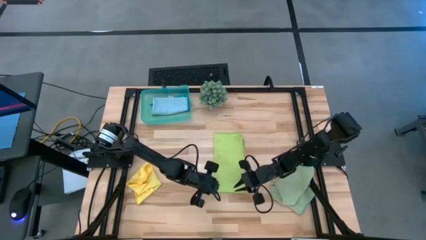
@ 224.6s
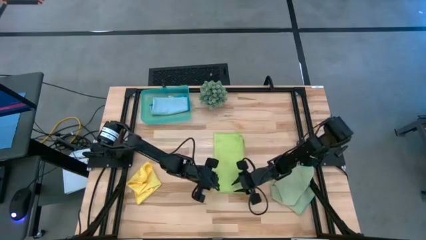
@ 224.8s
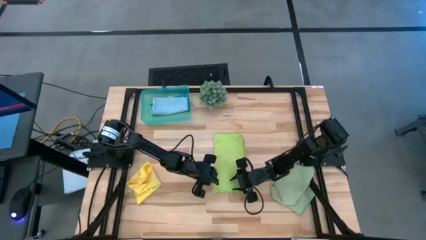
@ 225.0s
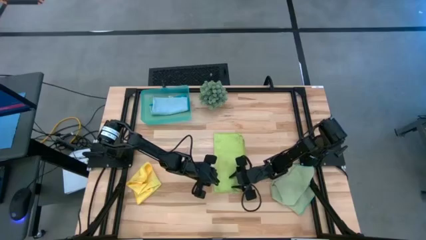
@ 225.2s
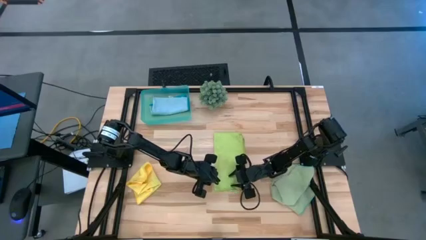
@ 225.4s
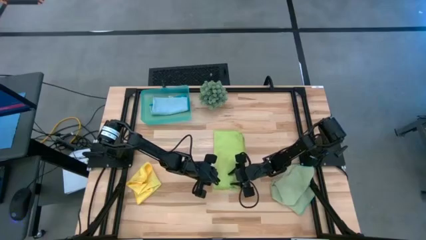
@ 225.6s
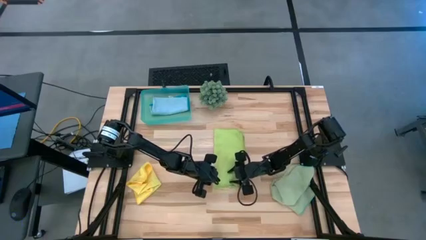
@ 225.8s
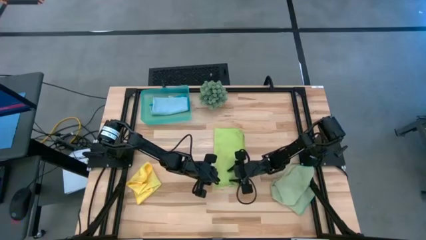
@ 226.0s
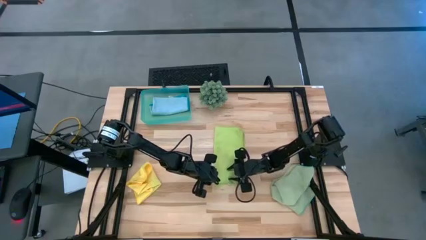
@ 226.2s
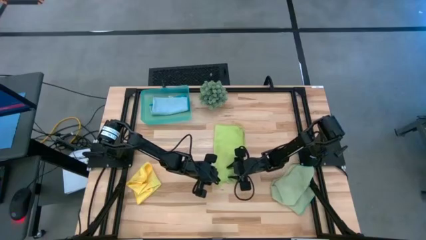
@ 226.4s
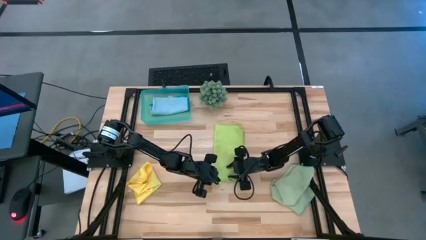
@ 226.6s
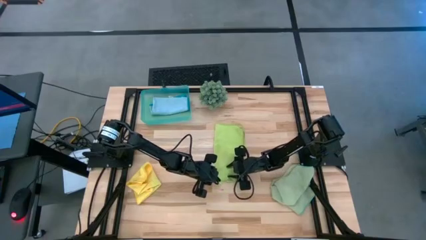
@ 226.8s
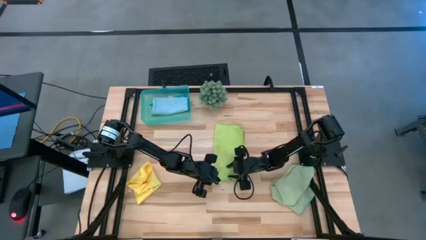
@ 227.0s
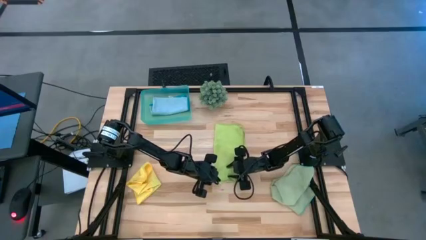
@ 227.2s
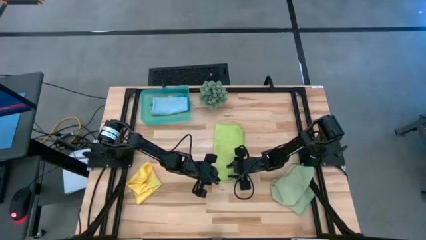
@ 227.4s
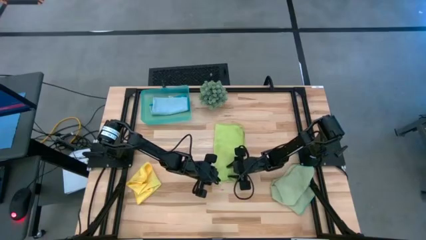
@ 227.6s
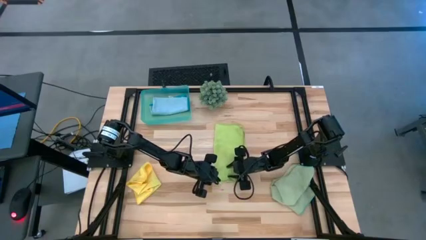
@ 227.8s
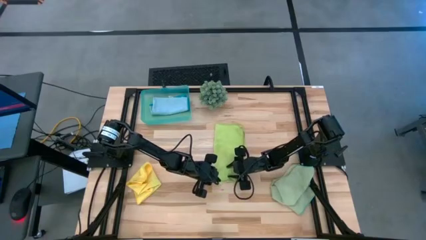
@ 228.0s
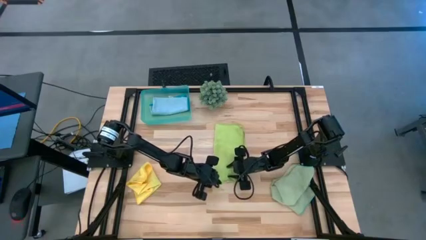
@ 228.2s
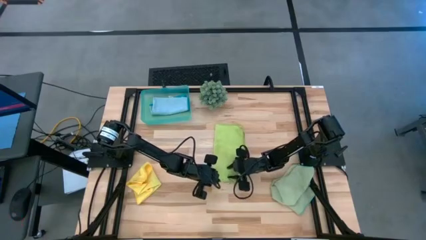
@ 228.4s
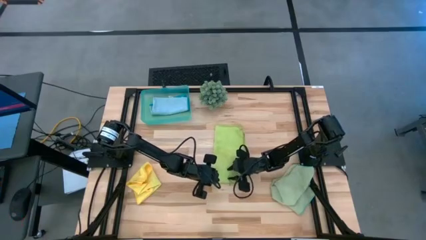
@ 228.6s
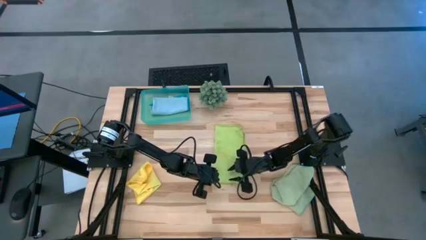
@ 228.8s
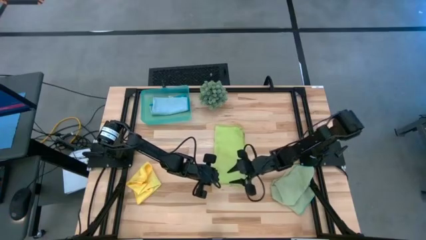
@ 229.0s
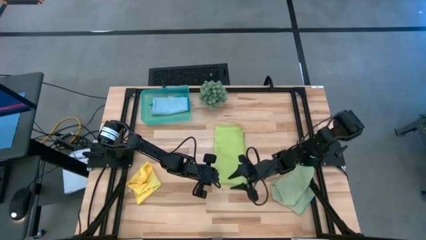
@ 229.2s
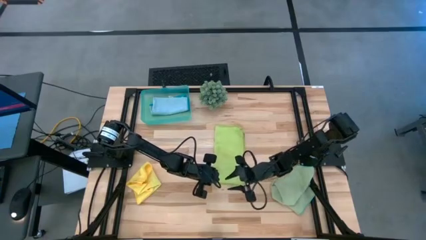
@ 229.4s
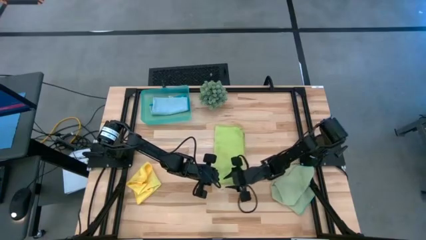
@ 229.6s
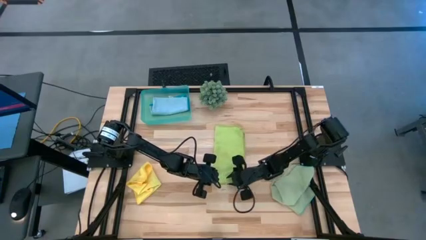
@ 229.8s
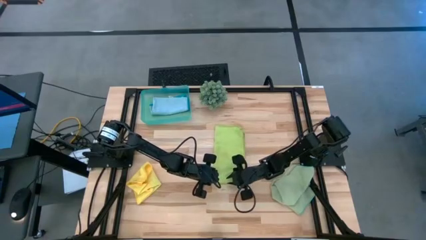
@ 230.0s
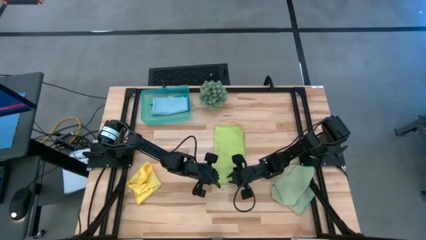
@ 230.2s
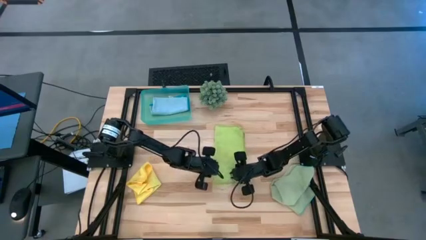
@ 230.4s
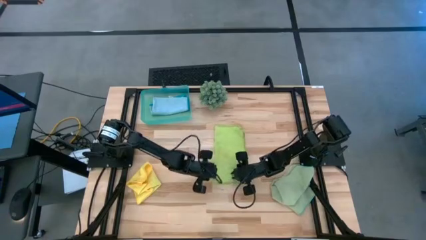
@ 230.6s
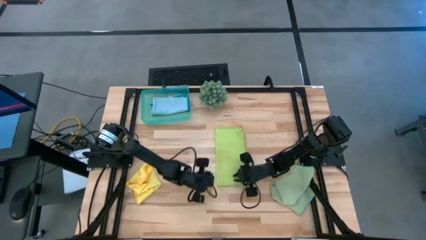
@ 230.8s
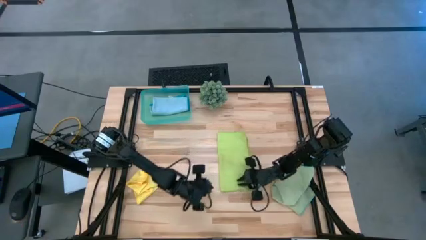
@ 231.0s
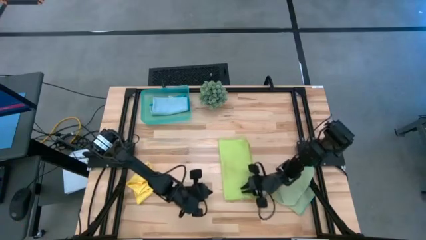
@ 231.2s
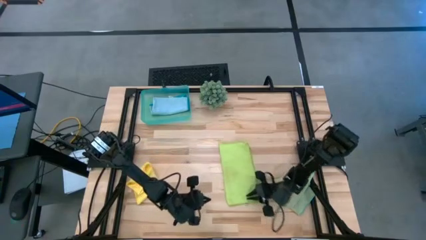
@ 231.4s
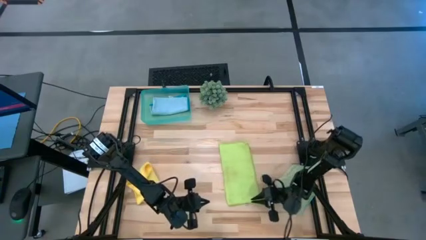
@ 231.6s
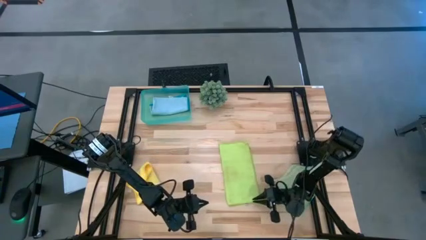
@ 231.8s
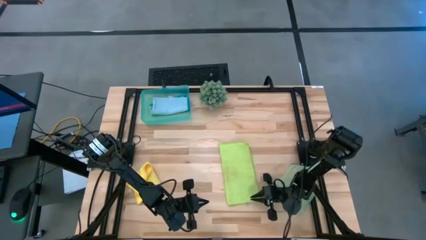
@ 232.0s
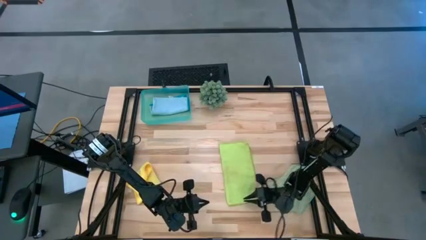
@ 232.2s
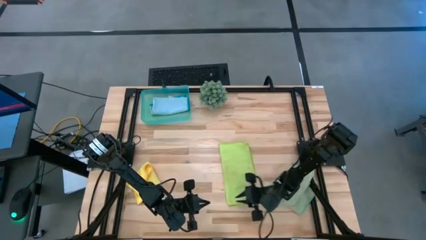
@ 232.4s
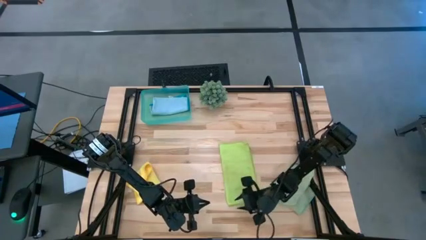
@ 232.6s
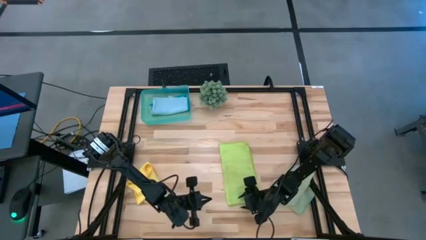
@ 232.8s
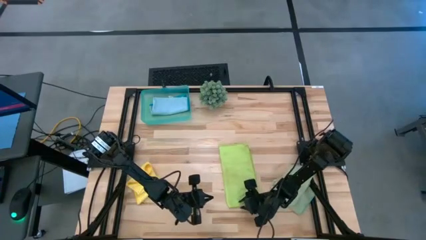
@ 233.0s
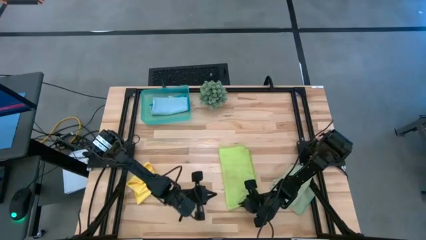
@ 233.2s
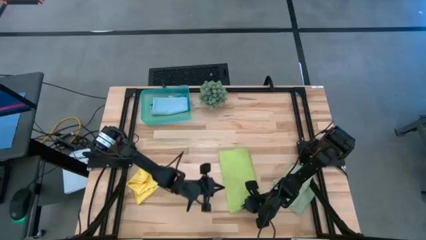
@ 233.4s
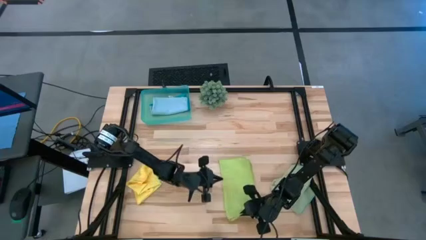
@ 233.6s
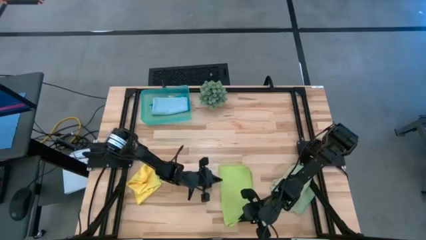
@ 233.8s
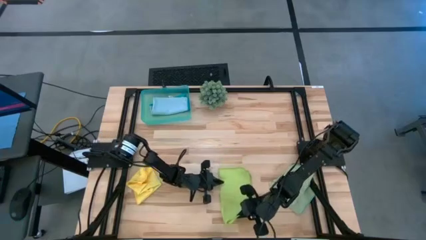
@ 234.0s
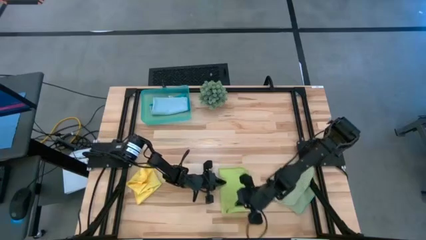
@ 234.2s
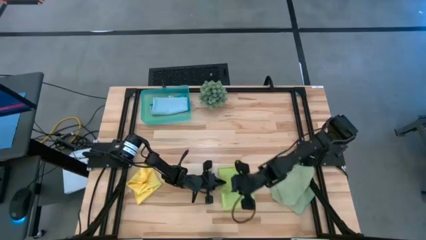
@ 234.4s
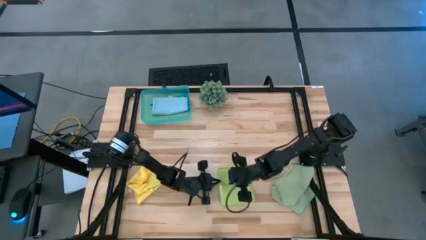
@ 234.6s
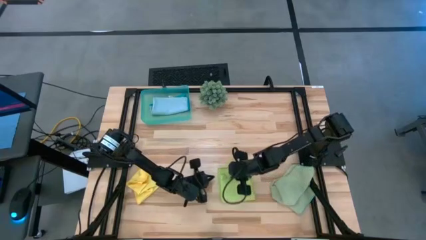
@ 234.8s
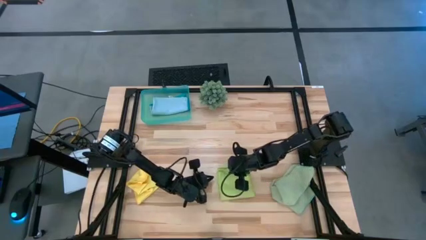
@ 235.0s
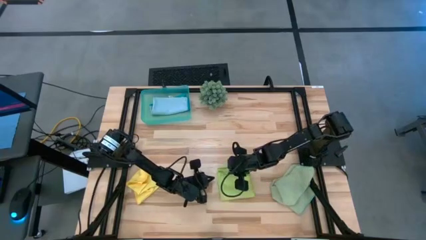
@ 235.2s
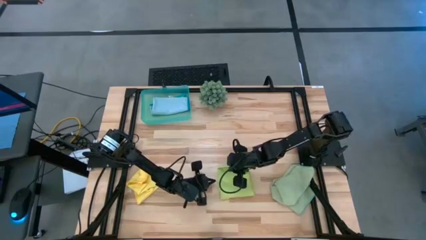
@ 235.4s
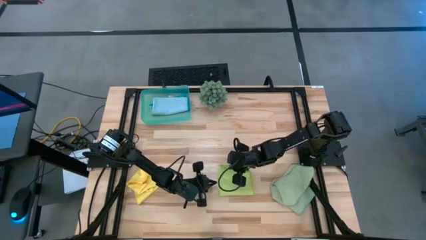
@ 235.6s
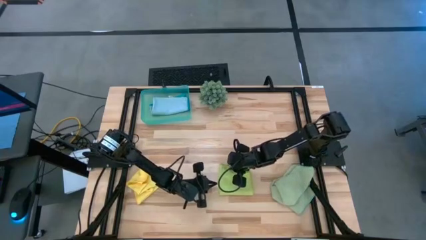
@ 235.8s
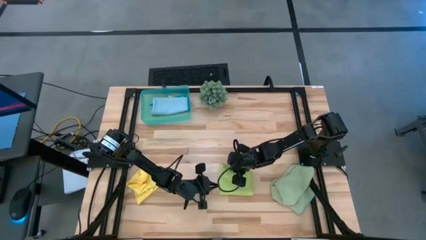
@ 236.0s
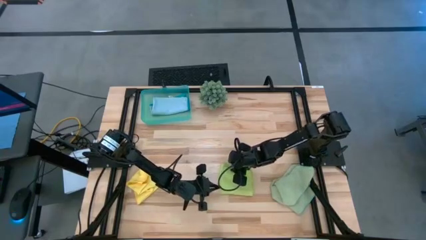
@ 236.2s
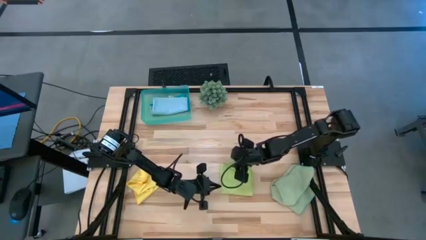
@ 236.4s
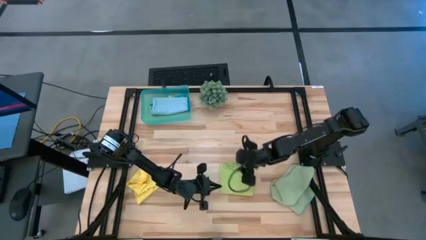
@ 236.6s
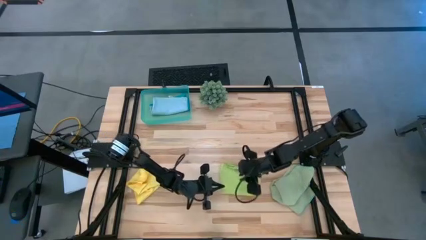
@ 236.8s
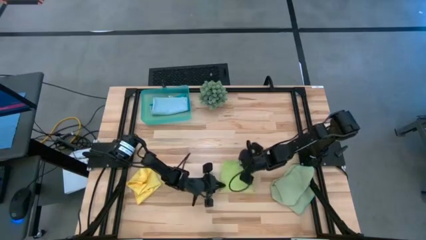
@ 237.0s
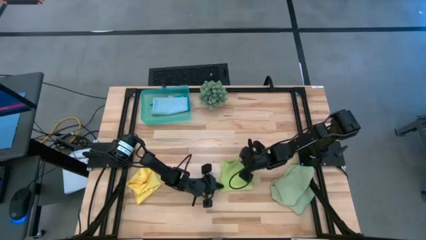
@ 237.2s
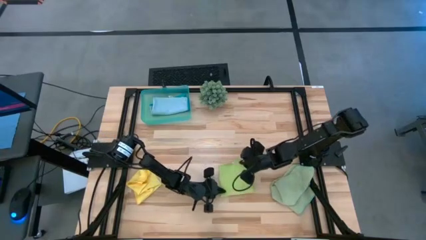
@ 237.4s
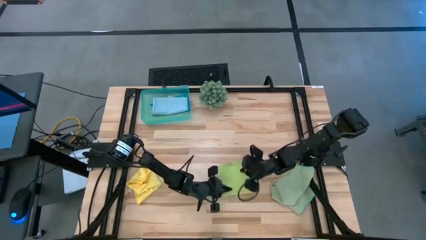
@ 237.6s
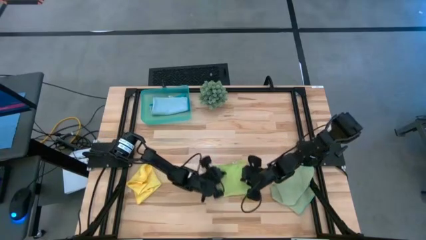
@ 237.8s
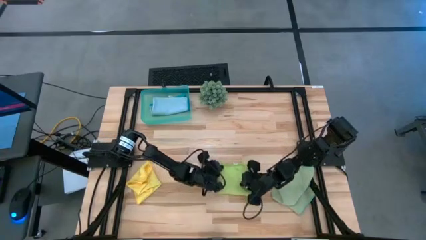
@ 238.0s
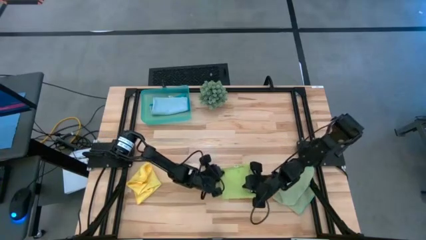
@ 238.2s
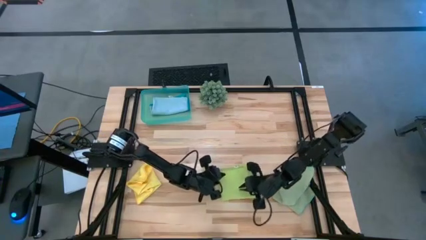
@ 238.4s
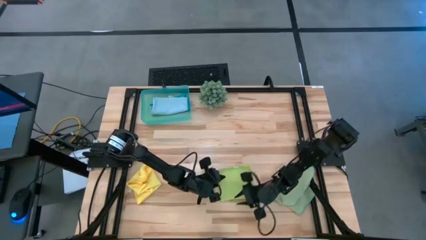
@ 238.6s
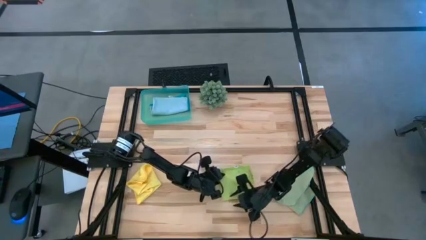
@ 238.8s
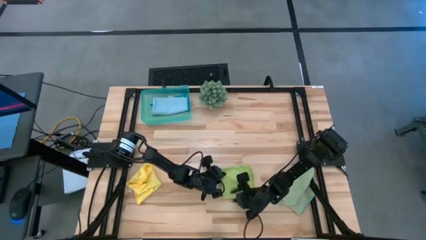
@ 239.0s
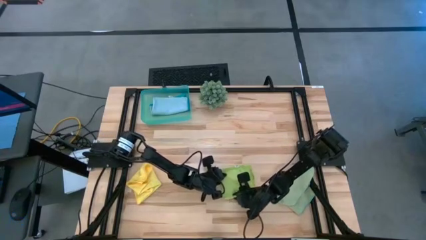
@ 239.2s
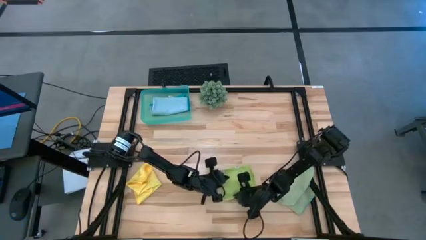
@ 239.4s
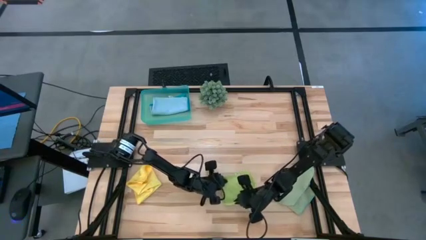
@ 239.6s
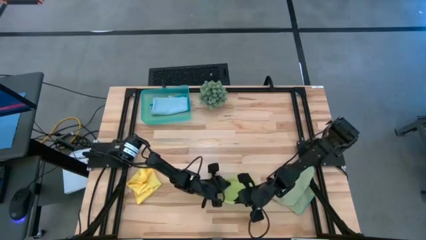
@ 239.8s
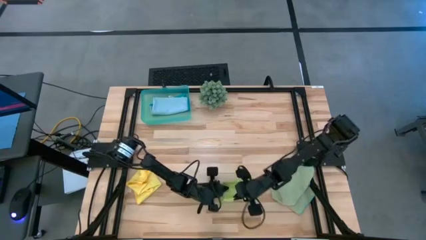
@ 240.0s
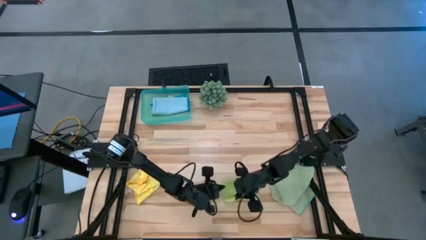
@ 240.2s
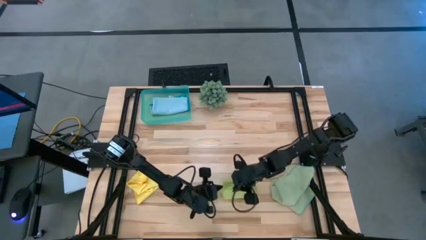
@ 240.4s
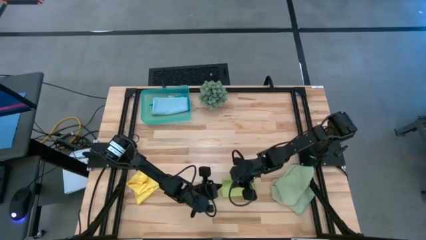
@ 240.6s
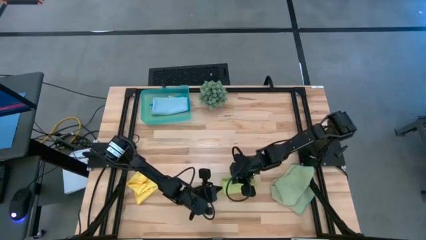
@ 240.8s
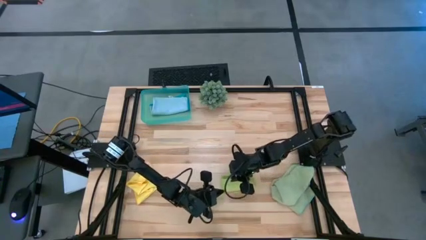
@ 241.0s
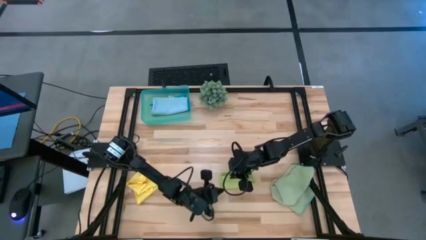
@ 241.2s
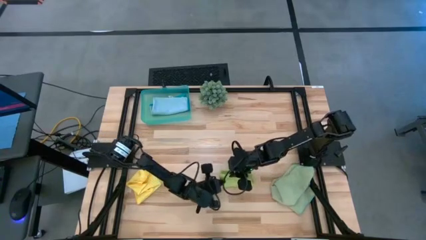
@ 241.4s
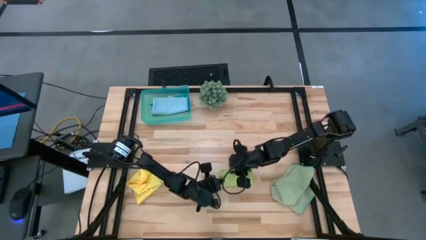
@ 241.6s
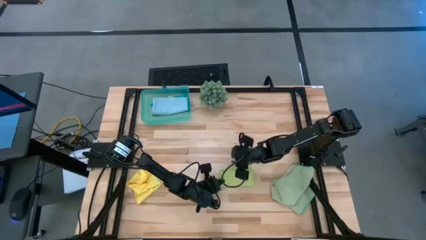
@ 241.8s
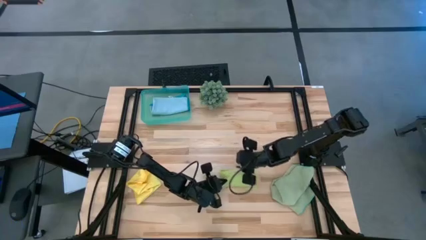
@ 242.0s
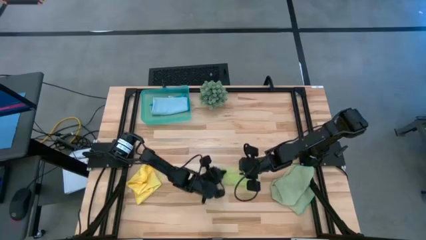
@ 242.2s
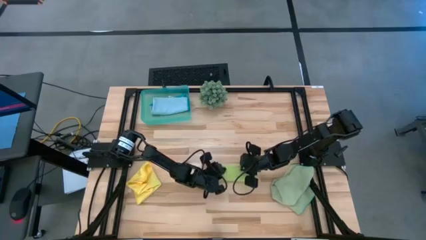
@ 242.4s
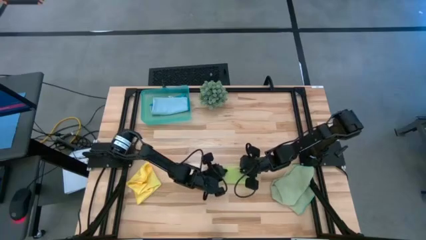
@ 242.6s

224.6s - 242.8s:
Task: Fold microfiber towels
Fold the light green microfiber cloth
